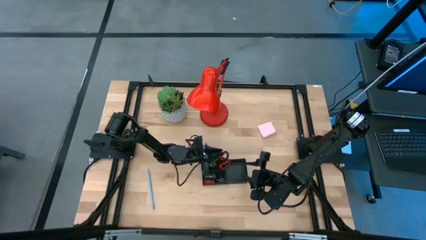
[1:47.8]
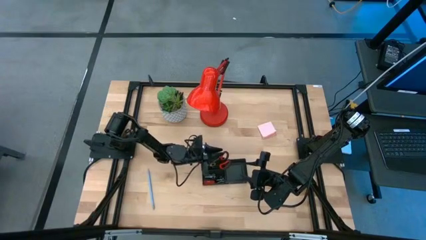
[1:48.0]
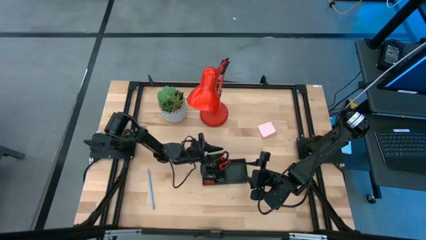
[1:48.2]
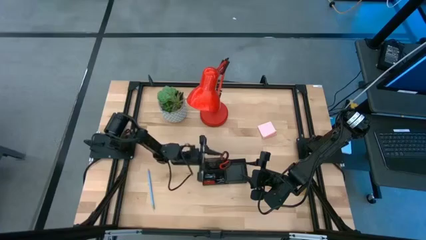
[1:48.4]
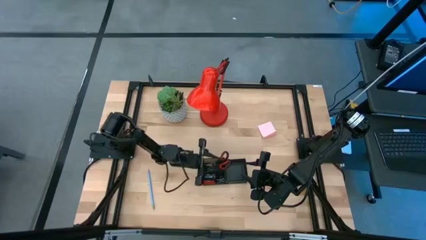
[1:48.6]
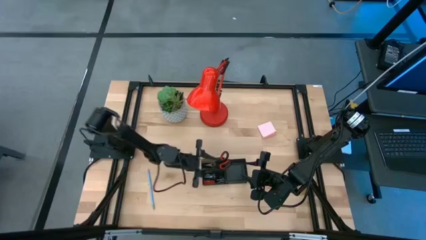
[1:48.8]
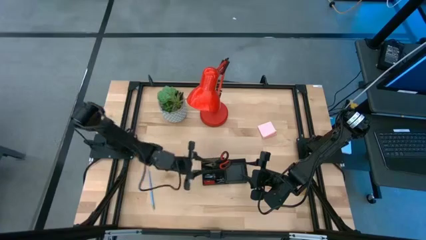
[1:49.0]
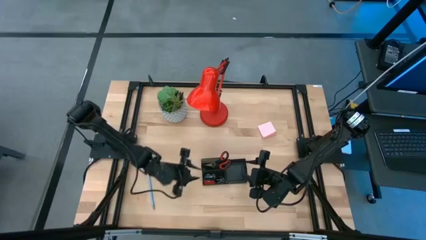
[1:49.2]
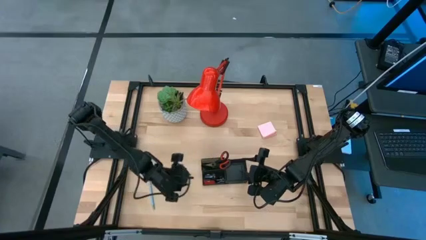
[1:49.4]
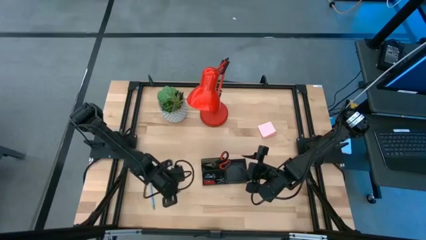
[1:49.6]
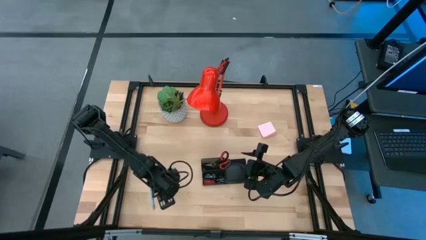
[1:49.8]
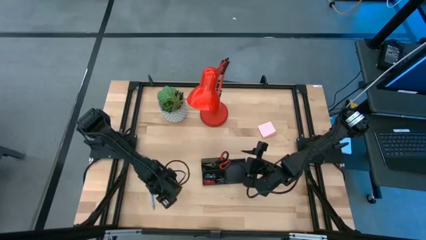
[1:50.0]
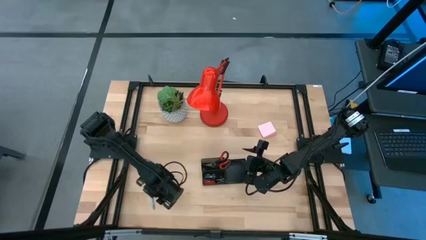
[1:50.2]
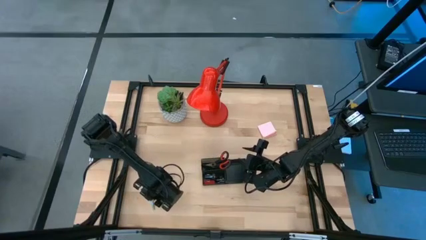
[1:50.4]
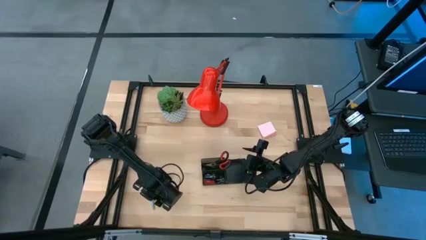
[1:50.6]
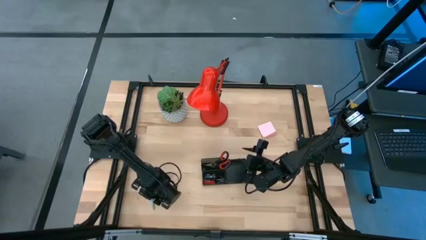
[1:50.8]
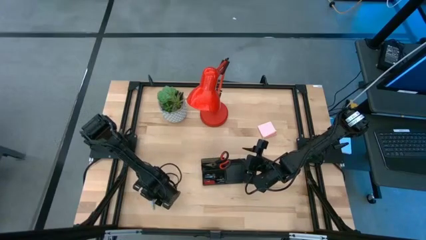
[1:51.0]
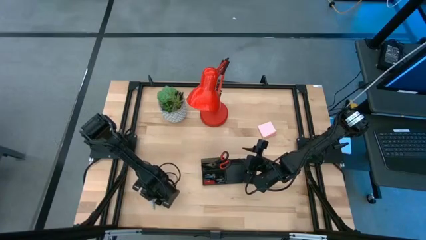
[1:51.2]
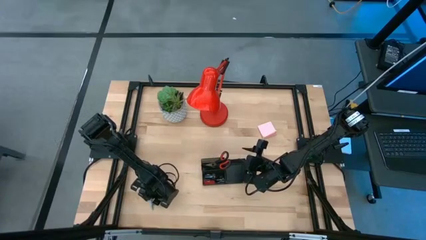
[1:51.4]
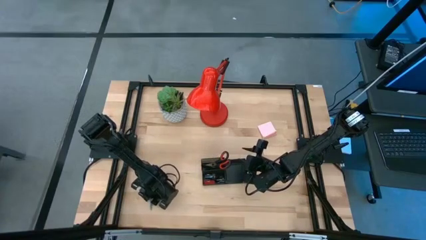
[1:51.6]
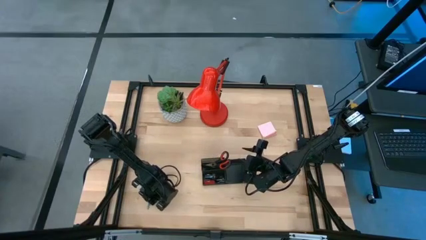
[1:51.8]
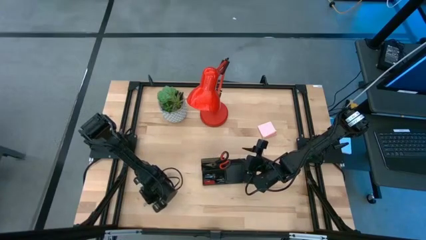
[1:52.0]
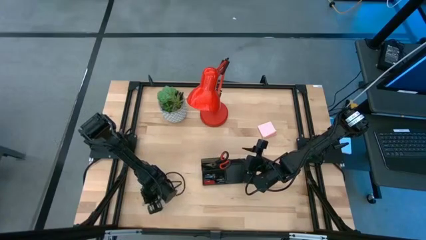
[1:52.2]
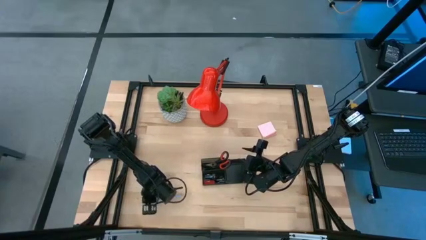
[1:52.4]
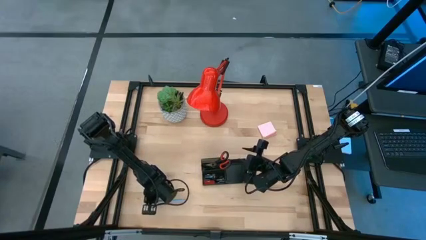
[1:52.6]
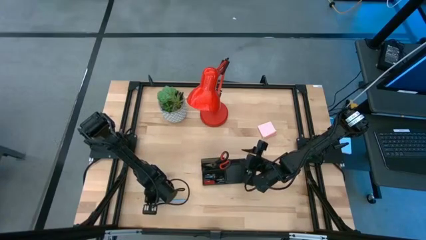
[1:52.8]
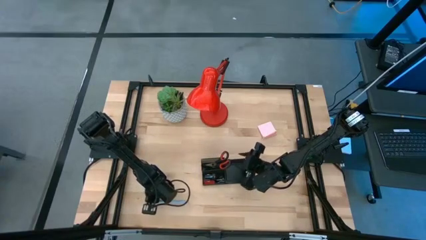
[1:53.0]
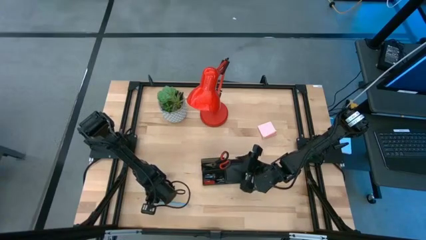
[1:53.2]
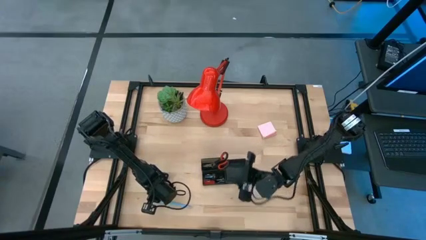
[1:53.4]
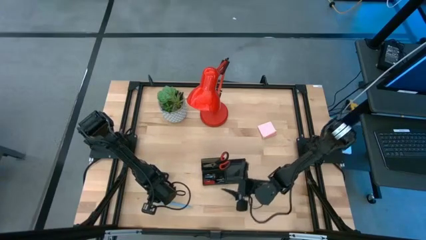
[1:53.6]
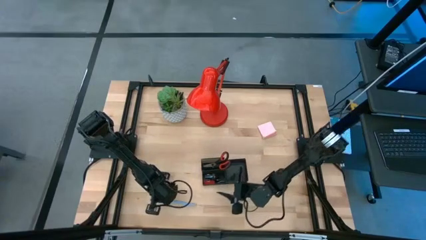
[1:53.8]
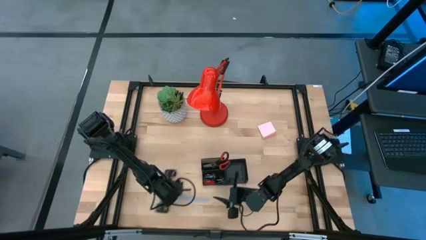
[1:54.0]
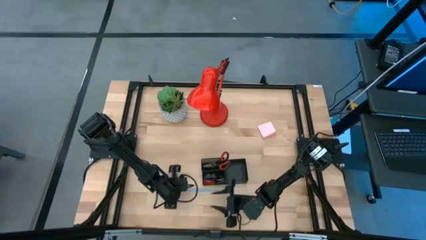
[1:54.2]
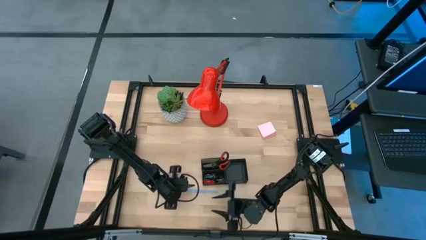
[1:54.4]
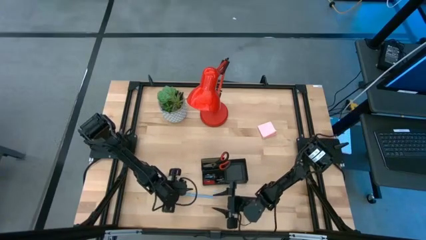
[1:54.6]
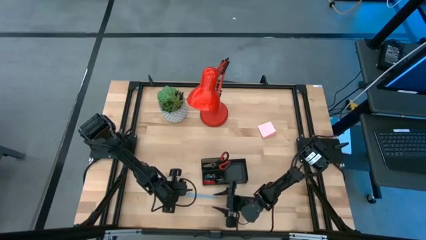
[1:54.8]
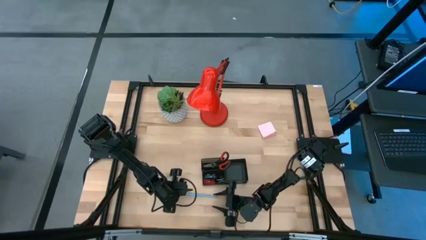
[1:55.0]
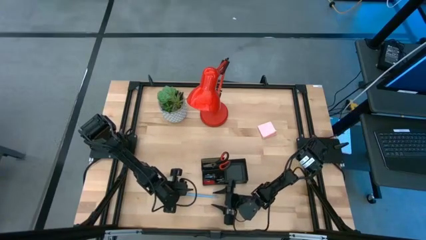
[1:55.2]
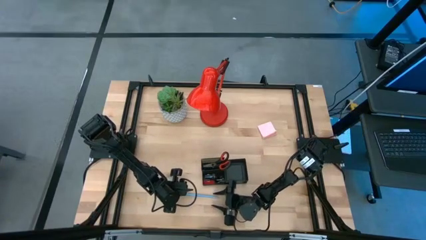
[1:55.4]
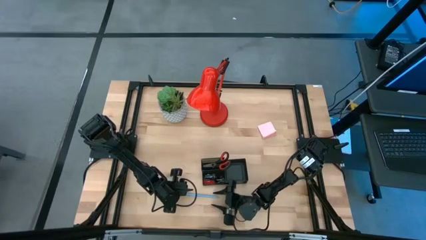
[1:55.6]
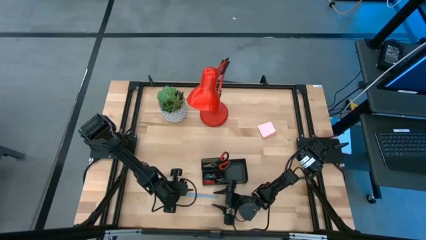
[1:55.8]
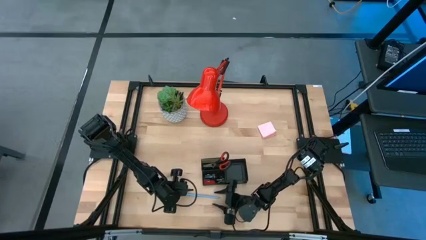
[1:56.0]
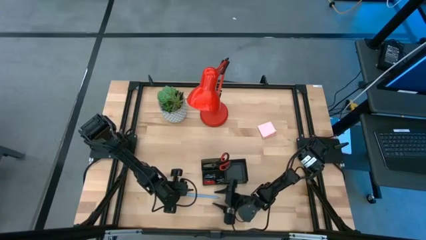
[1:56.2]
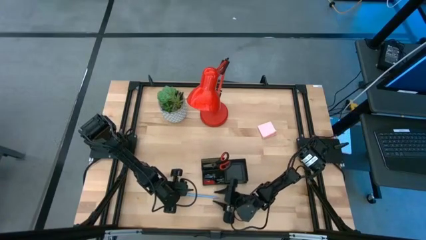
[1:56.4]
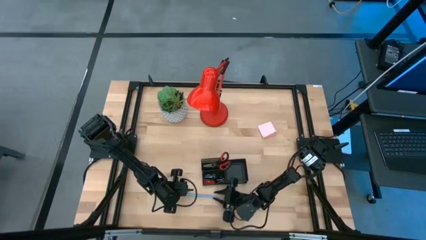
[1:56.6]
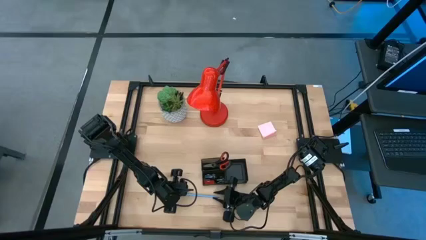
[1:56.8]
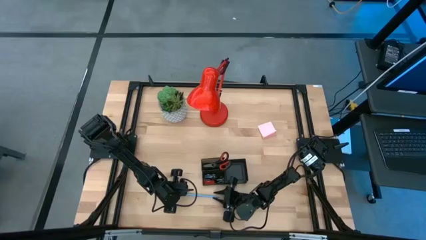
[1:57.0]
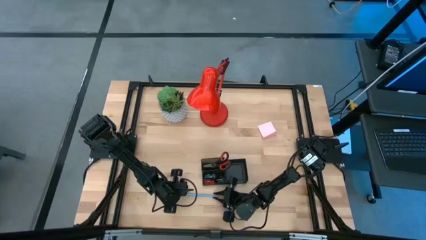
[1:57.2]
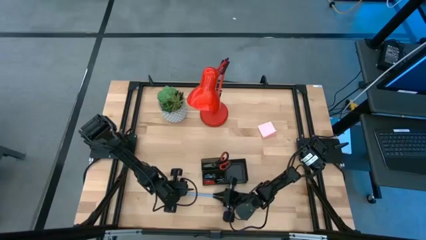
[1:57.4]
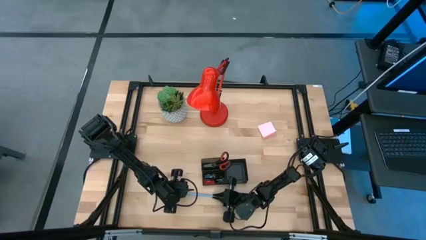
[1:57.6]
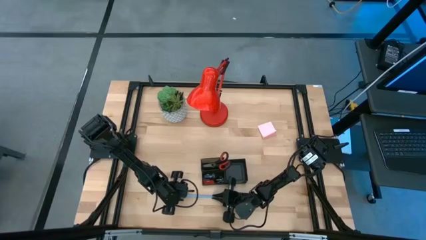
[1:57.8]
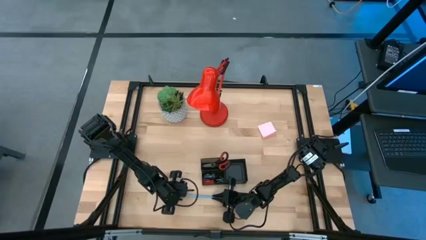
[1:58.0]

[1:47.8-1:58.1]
Task: Pick and place office supplies into organizer
Put the blue pencil into the black desk organizer

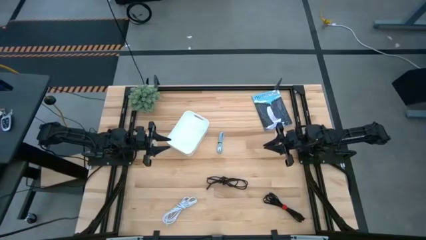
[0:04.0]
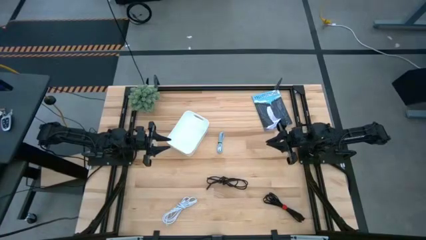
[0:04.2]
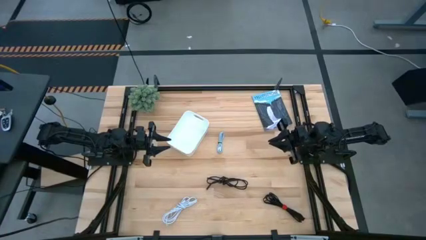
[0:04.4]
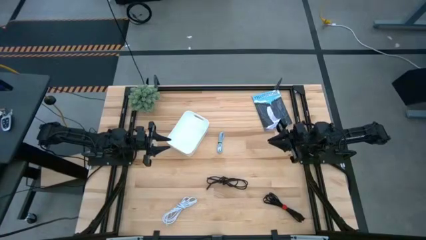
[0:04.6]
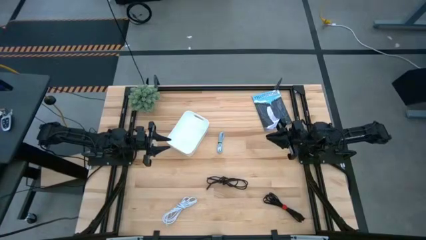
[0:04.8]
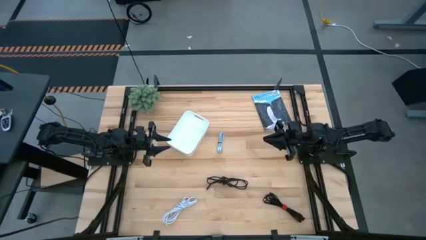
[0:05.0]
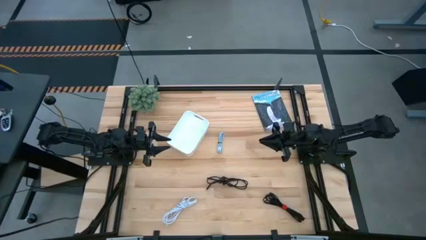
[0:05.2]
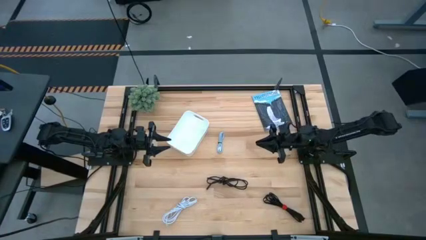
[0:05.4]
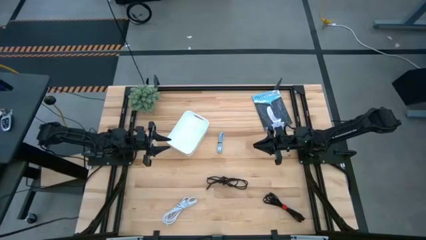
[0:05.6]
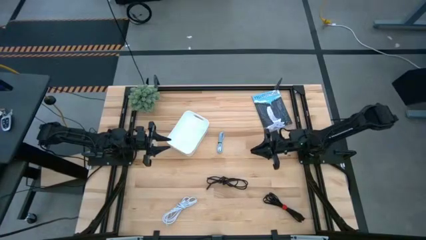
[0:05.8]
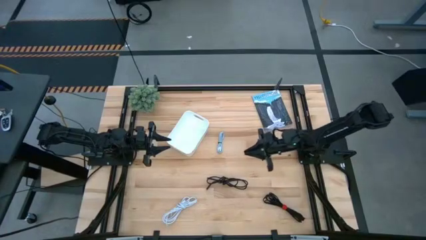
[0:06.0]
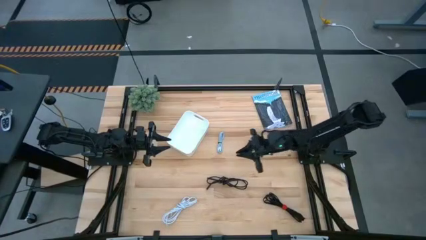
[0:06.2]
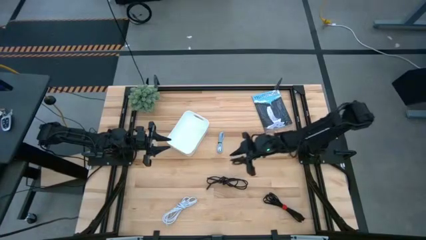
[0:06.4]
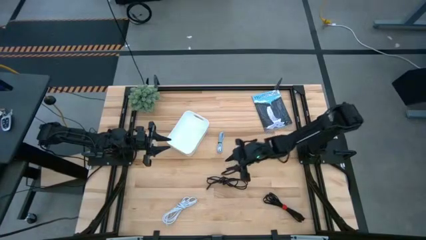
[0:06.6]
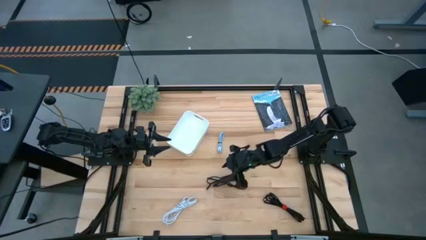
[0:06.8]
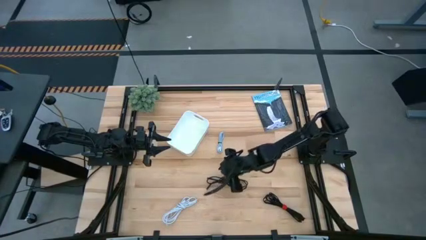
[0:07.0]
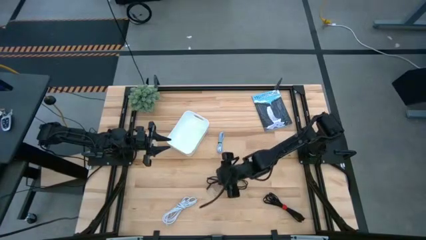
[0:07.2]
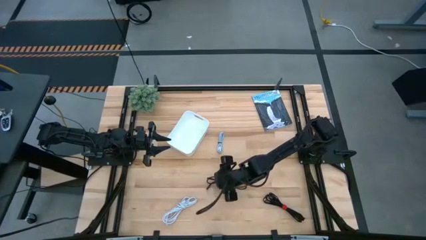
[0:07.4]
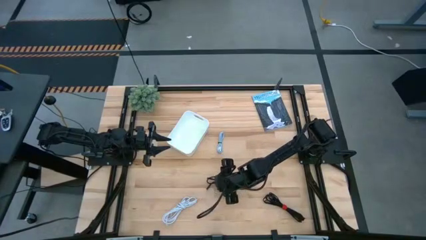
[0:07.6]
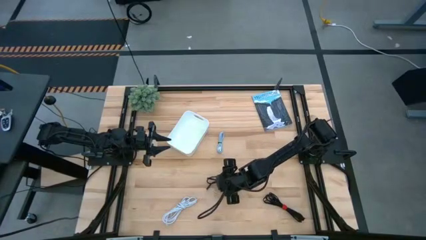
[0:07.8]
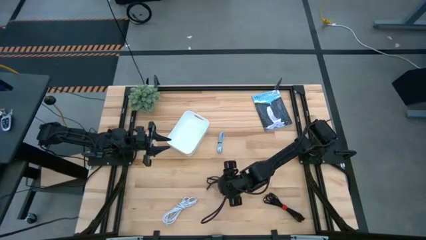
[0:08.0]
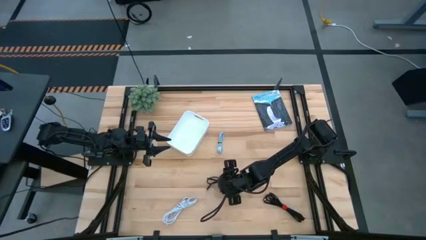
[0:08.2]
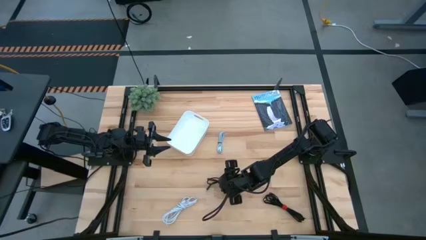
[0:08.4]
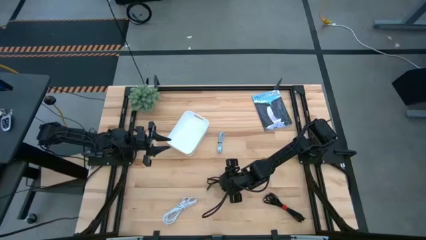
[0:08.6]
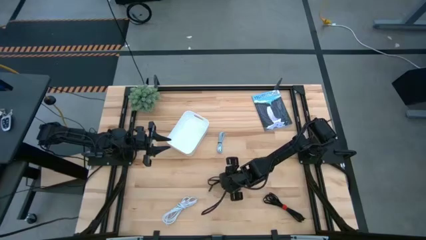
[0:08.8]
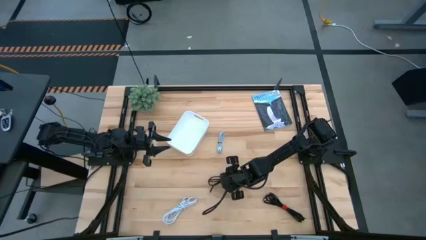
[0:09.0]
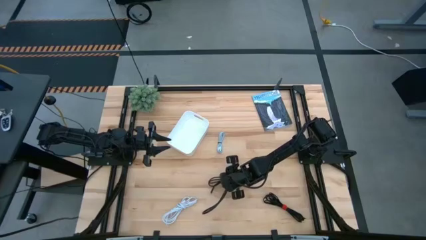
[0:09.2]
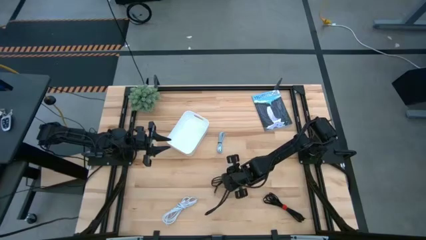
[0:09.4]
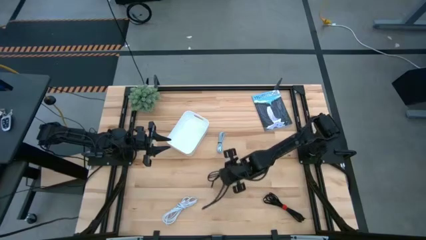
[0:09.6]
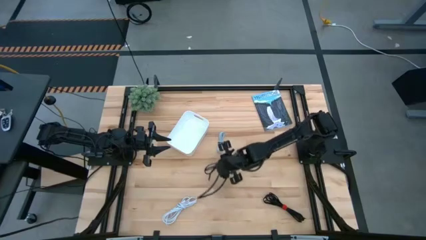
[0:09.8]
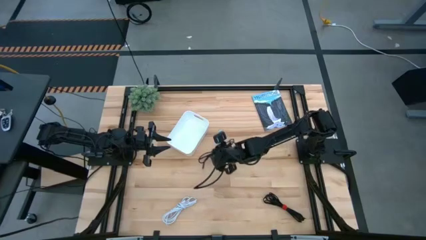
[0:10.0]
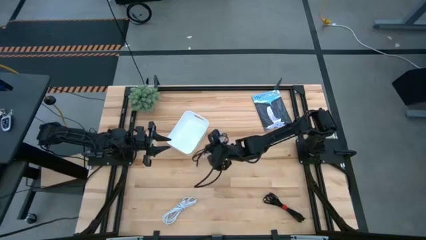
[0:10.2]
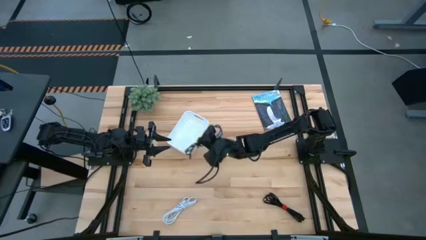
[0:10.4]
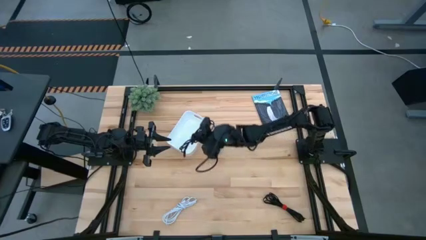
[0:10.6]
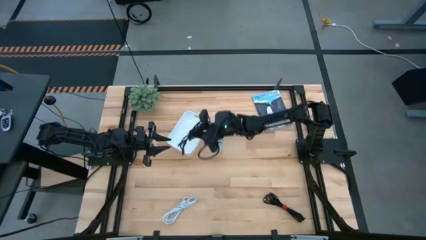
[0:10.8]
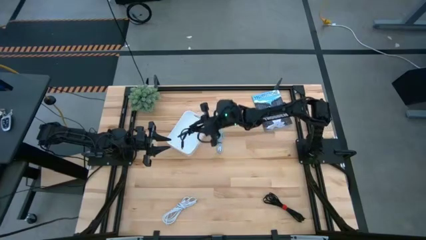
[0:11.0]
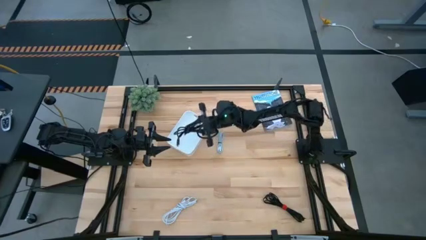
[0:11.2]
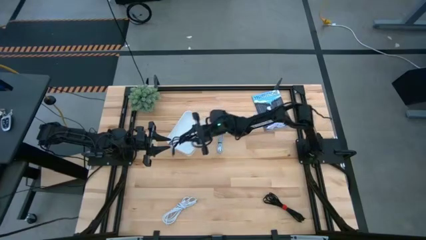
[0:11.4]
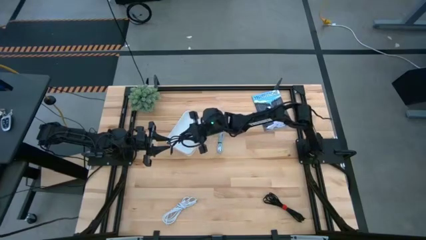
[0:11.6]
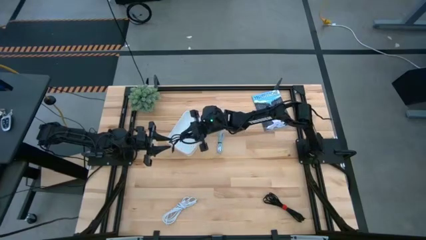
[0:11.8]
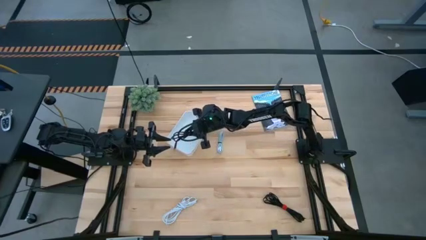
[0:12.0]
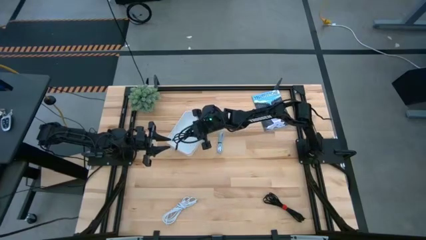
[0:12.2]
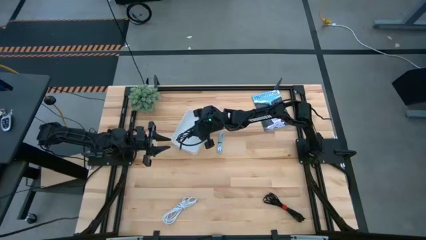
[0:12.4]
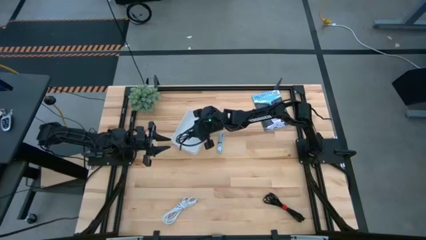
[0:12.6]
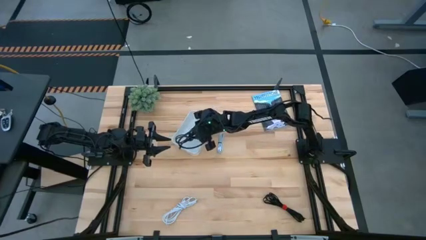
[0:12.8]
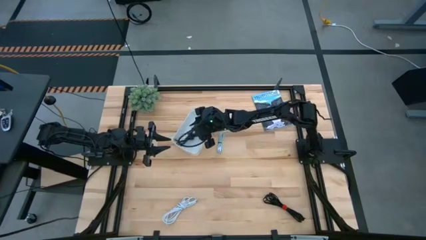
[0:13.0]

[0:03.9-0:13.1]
Task: Pick and place USB-C Cables
Put the top black charger cable into the white bin
